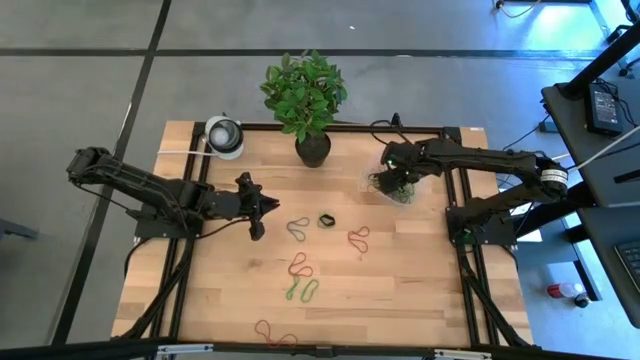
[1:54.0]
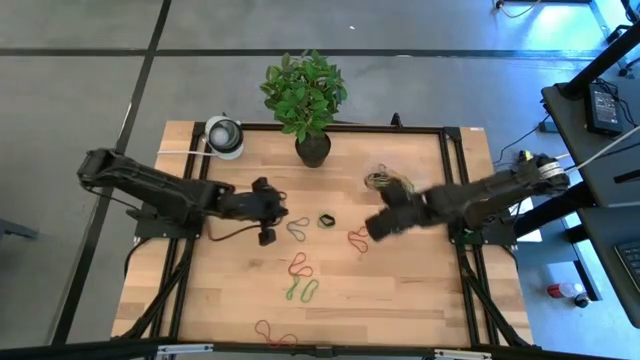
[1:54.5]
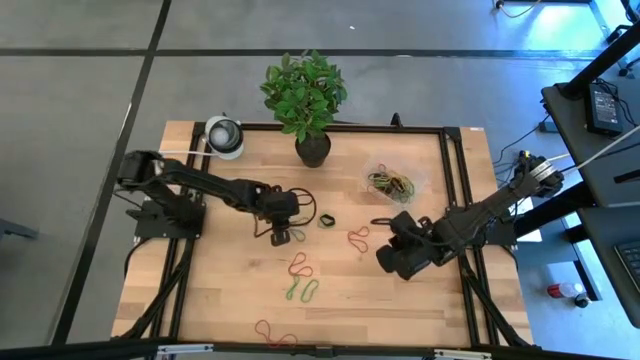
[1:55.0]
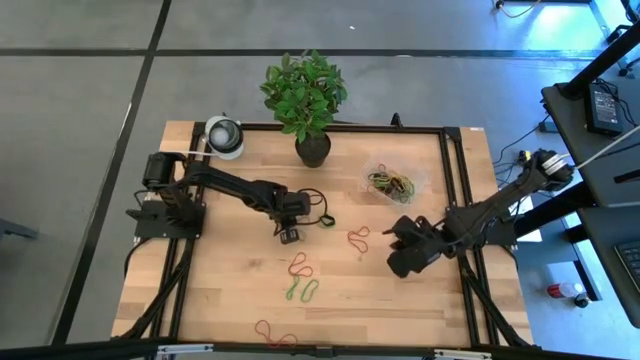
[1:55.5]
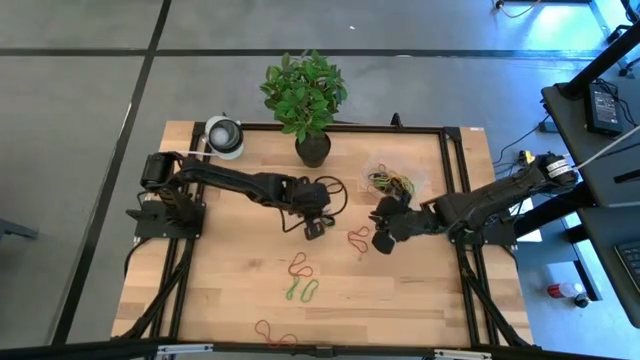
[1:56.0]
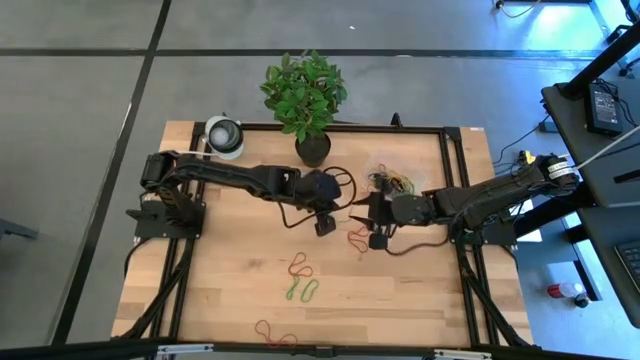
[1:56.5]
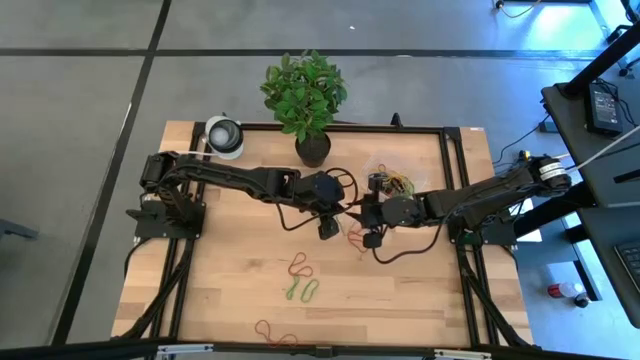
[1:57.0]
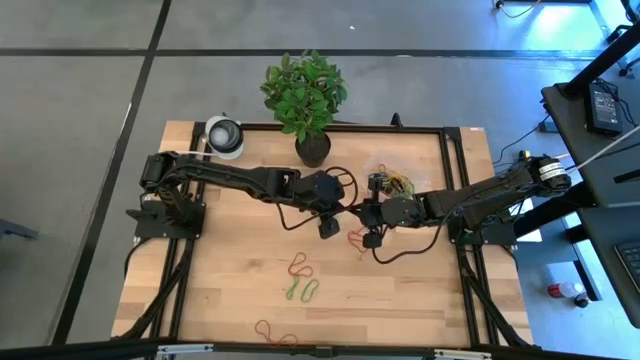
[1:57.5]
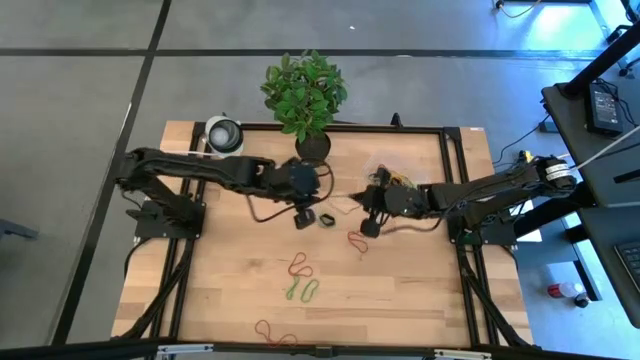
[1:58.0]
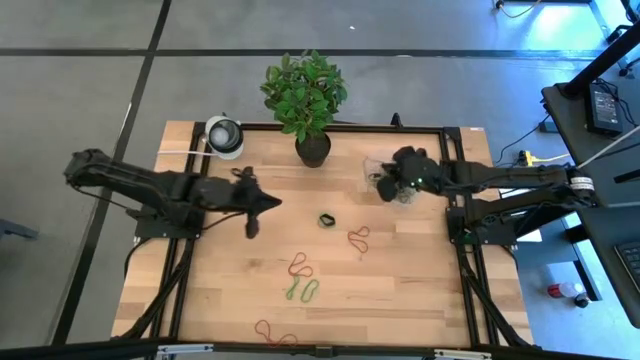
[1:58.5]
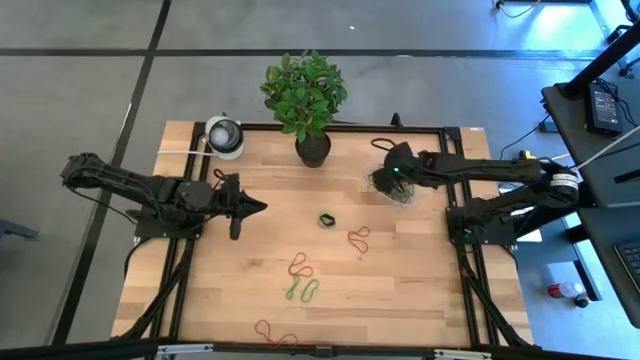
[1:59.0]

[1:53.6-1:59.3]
Task: Pick and place rubber bands into bin
Put the blue rubber band into the bin

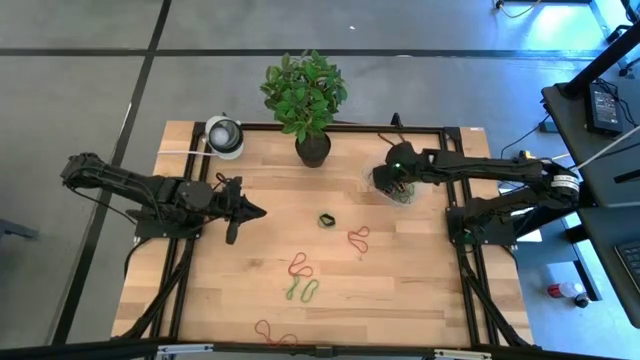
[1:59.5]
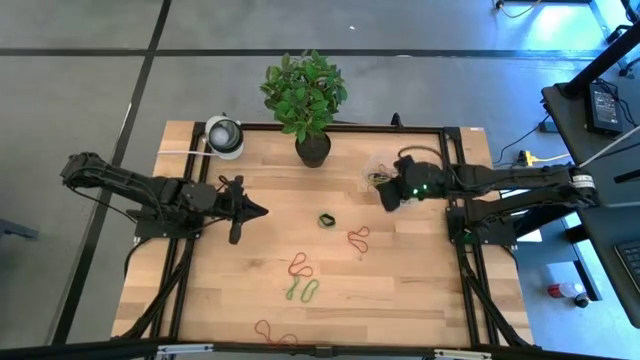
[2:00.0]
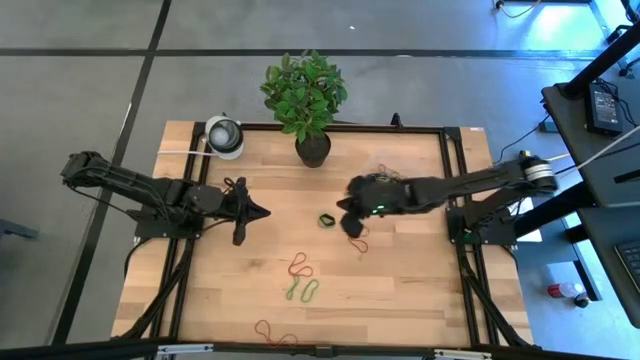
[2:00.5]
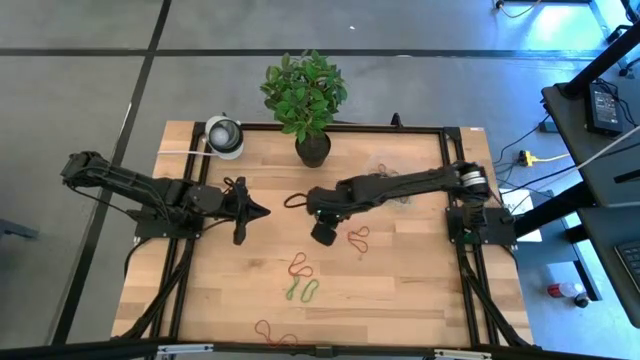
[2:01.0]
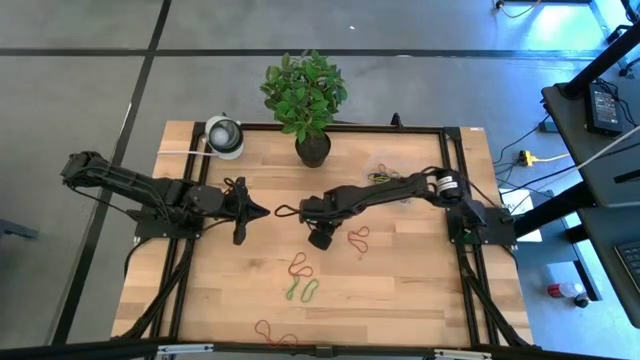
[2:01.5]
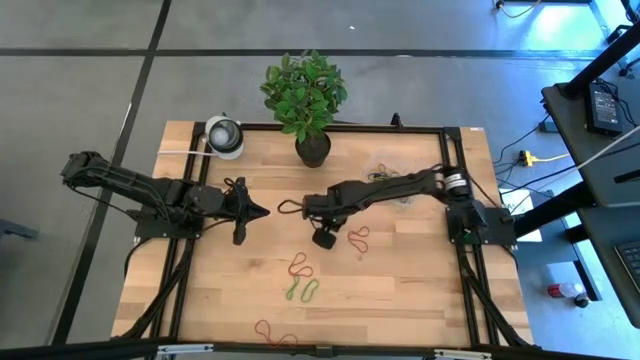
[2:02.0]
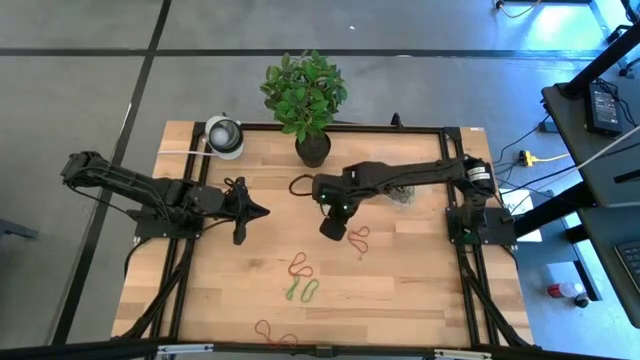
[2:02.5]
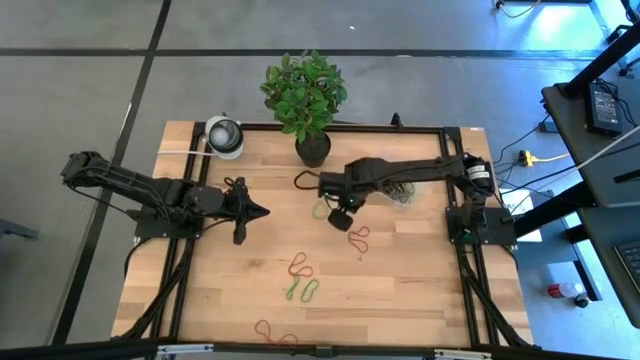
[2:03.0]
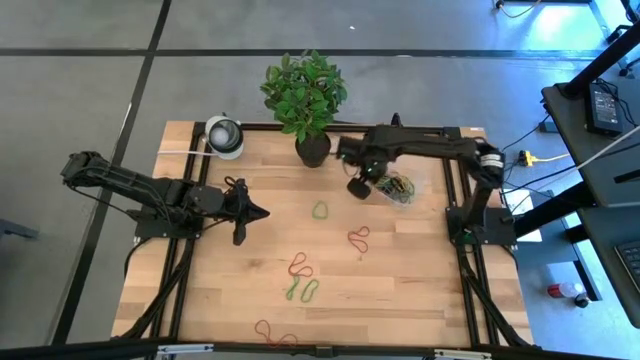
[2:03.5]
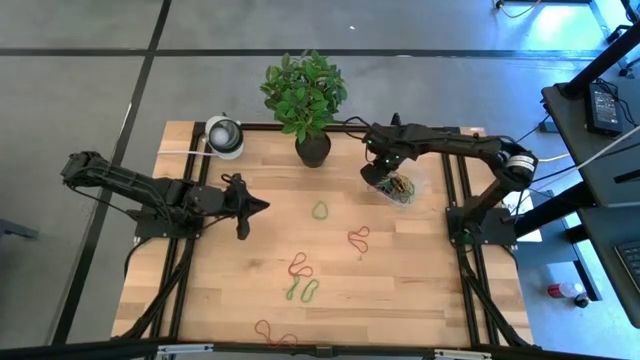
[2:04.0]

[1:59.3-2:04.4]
Put the black rubber band into the bin

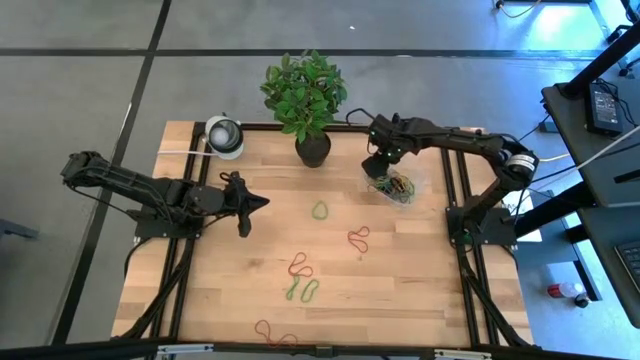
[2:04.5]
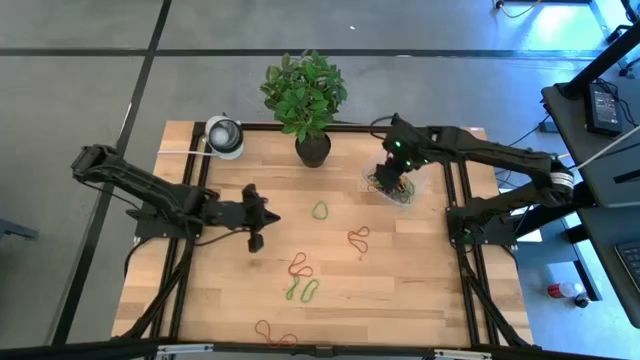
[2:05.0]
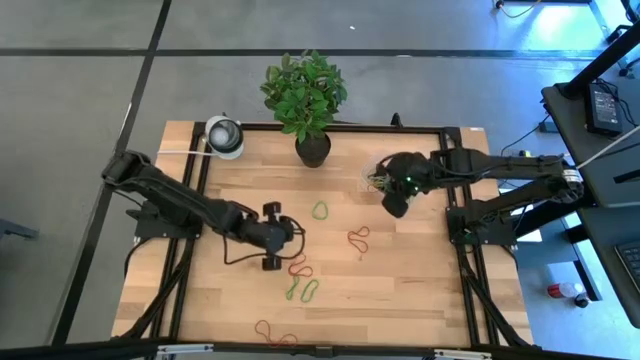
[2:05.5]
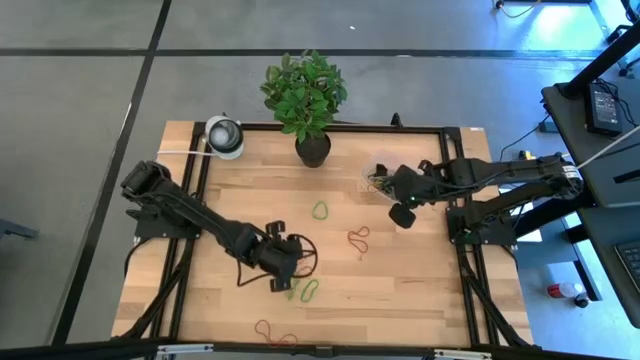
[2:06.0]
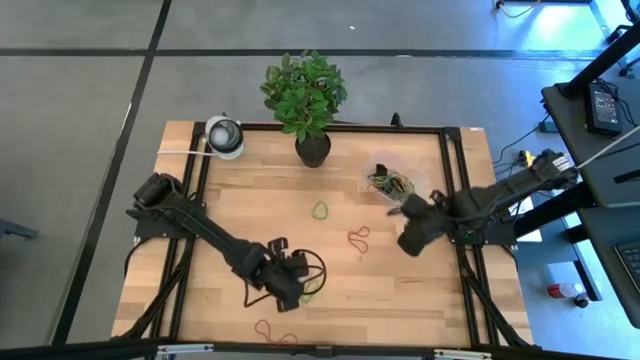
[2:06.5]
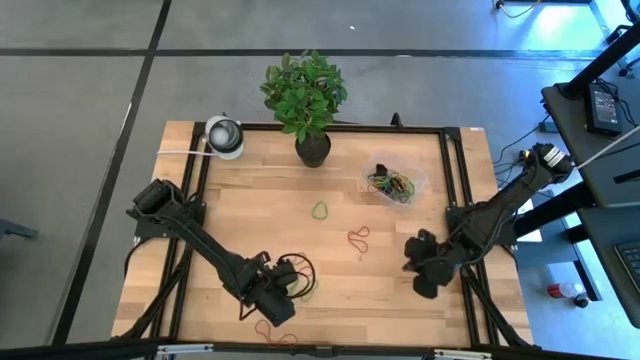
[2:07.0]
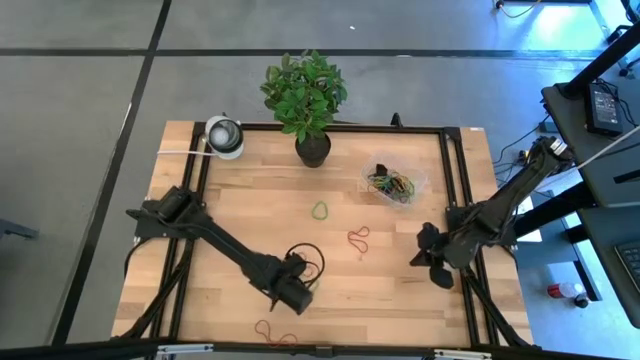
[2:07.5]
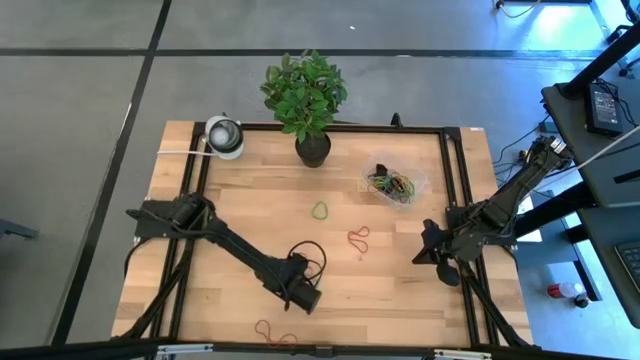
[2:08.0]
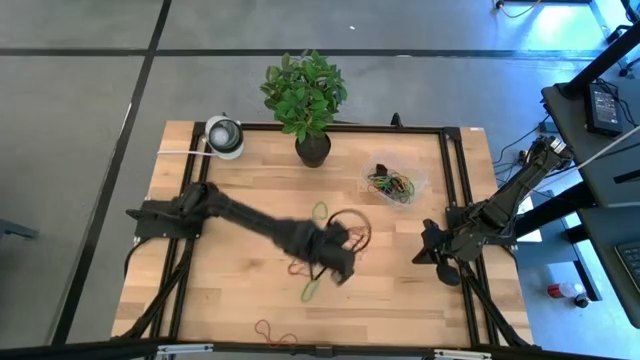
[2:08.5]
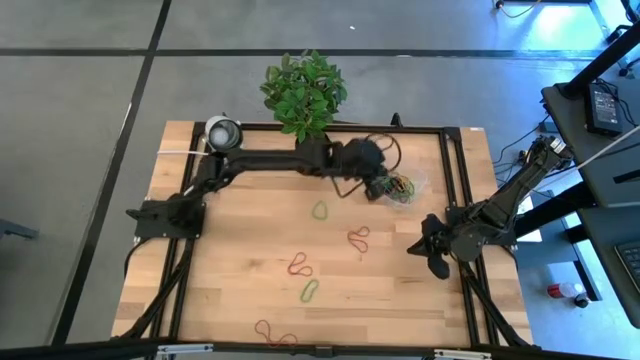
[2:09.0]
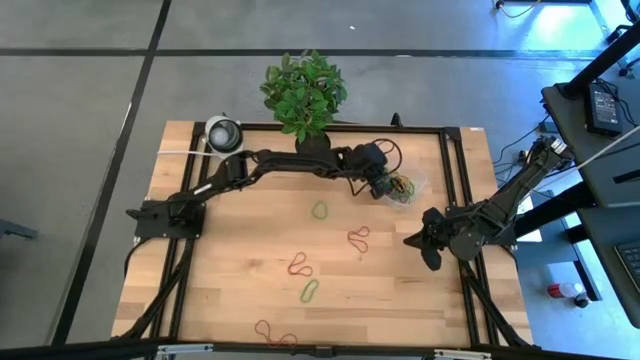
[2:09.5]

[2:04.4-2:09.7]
Put the green rubber band into the bin

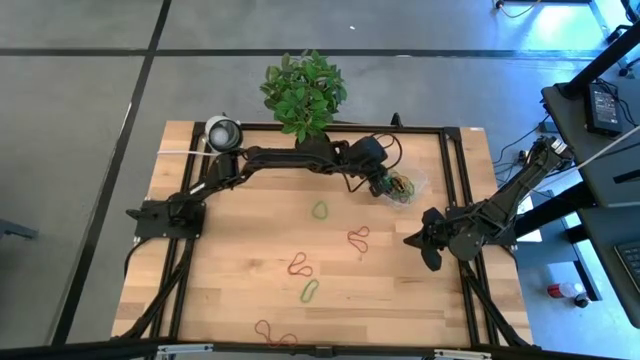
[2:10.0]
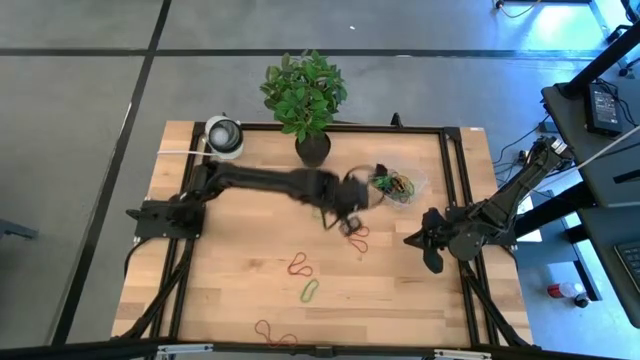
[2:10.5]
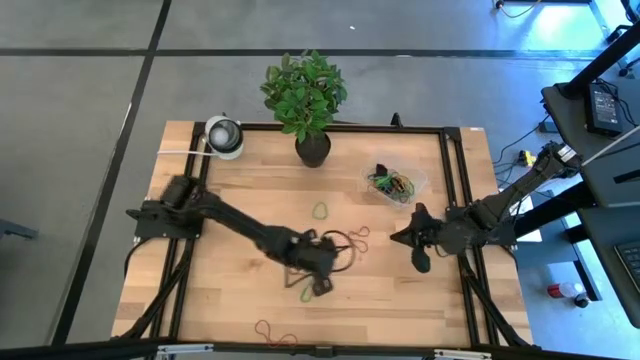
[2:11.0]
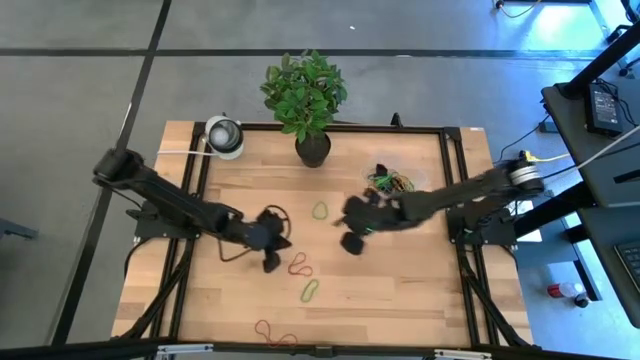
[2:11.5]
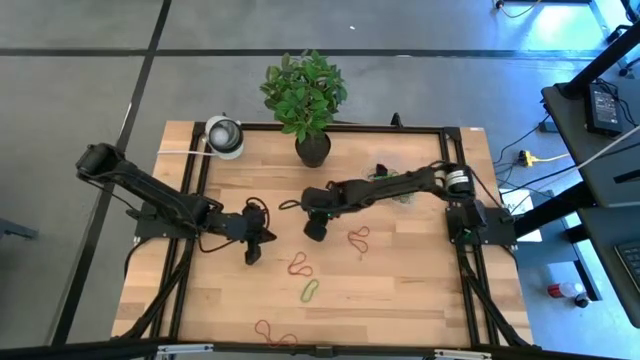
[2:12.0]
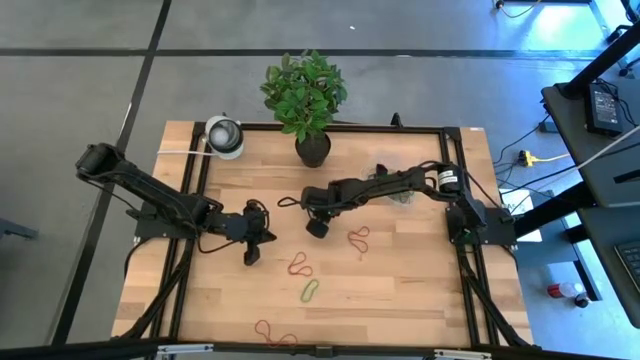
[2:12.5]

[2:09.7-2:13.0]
Put the top green rubber band into the bin

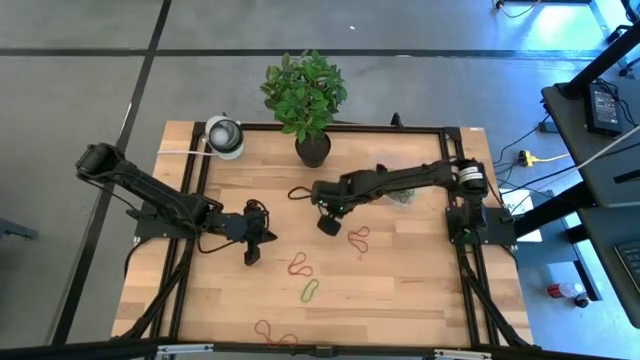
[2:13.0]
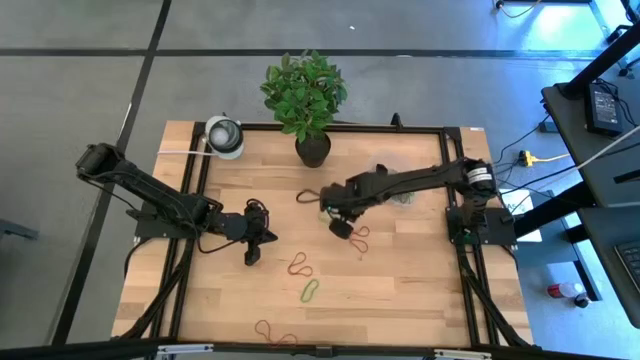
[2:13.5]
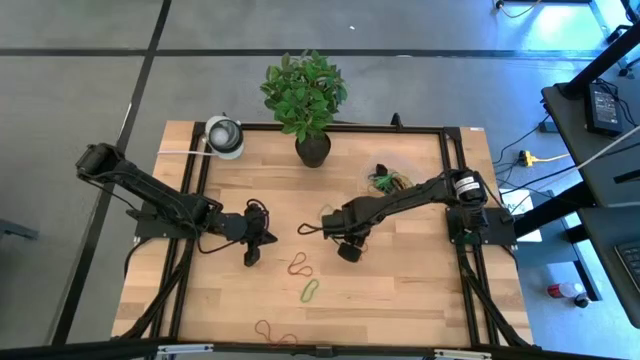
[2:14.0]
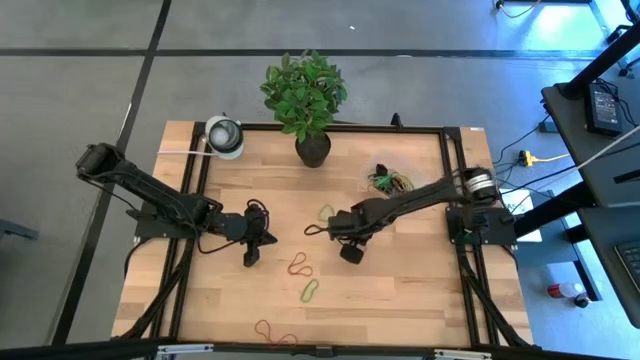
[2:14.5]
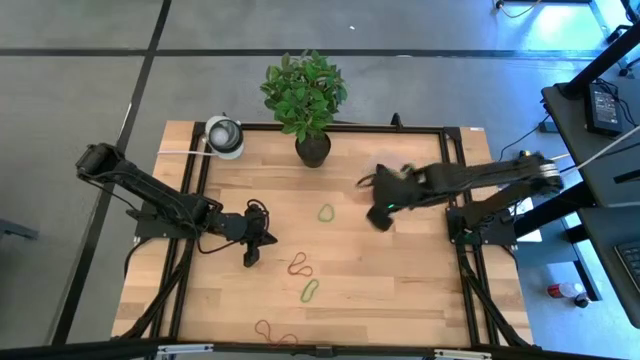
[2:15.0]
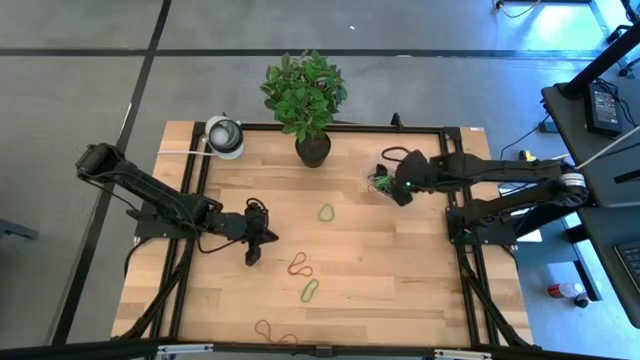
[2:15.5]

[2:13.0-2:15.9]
Put the top red rubber band into the bin
